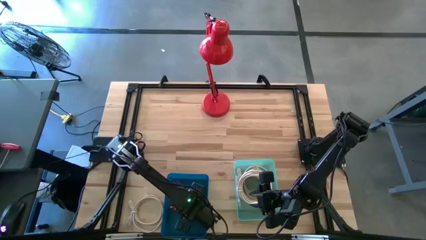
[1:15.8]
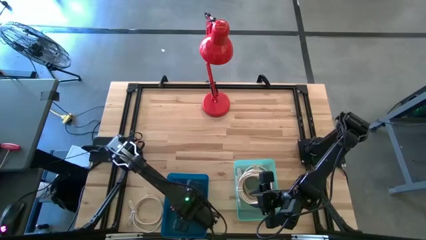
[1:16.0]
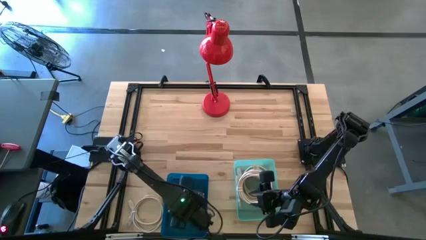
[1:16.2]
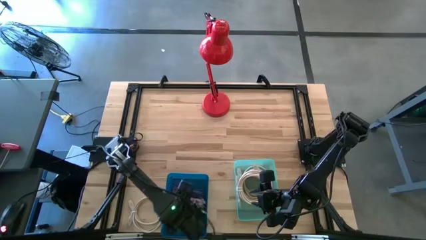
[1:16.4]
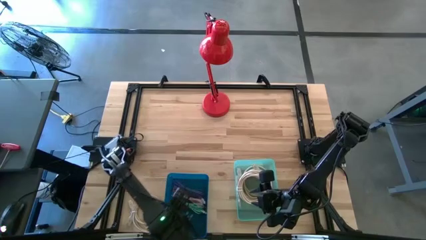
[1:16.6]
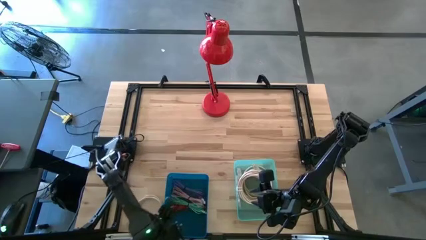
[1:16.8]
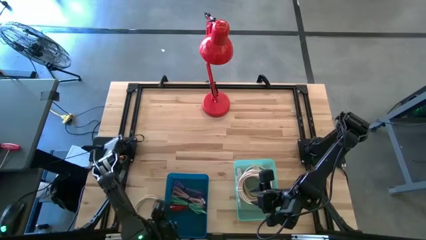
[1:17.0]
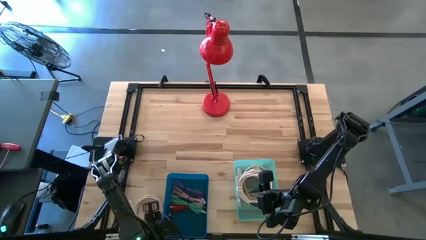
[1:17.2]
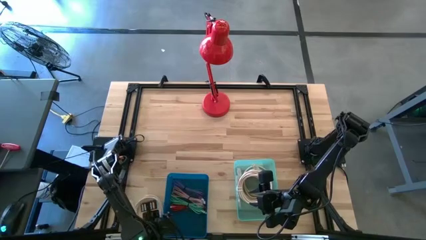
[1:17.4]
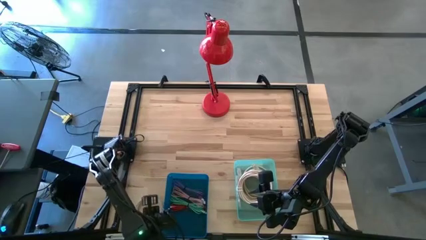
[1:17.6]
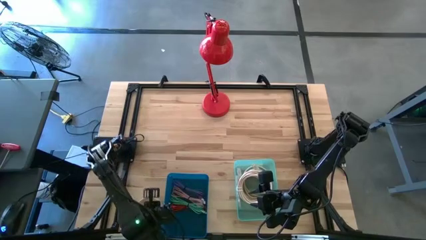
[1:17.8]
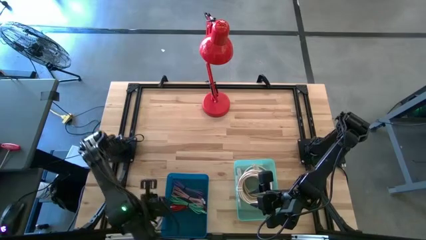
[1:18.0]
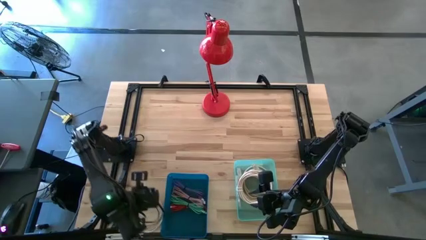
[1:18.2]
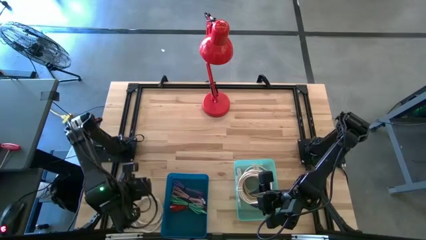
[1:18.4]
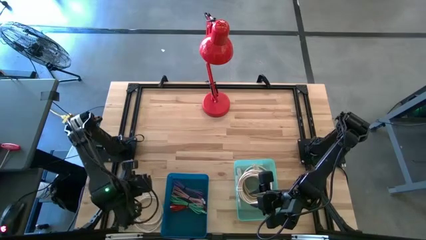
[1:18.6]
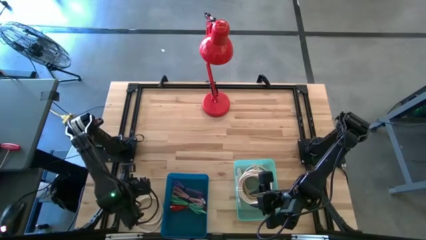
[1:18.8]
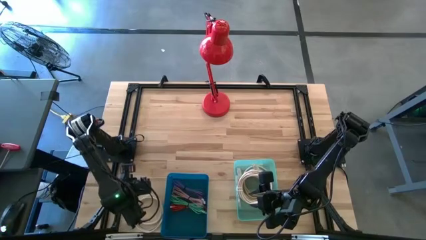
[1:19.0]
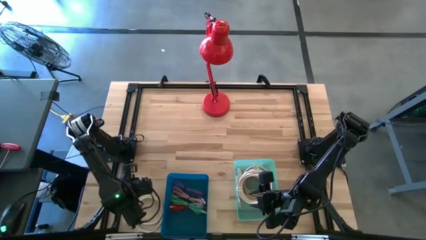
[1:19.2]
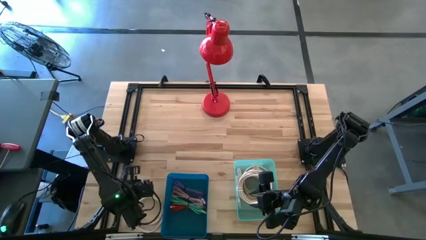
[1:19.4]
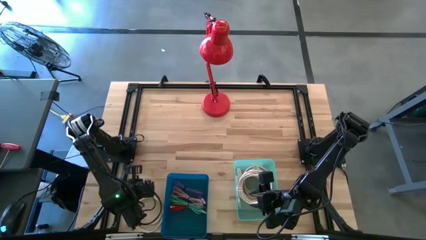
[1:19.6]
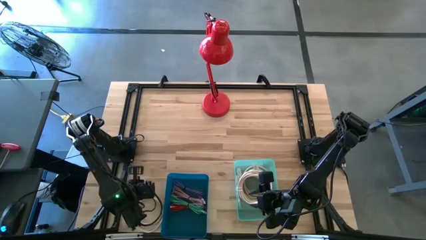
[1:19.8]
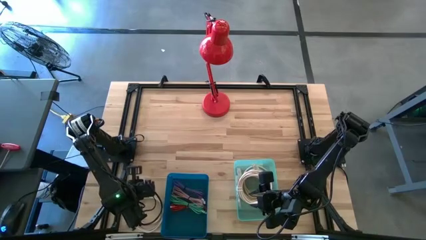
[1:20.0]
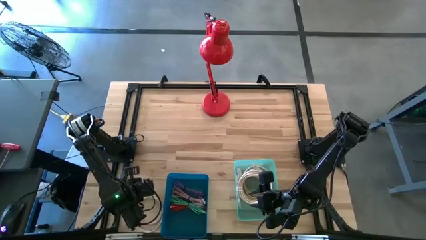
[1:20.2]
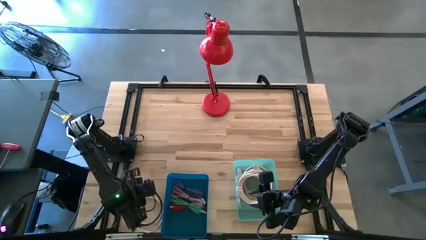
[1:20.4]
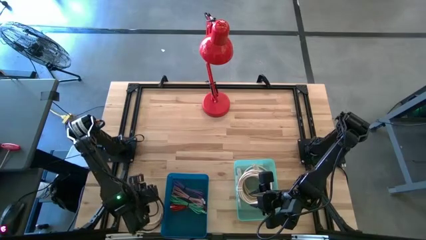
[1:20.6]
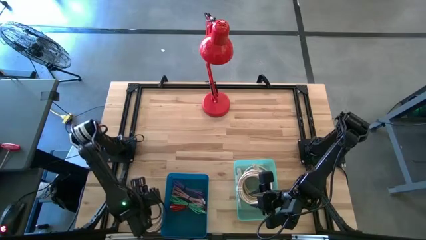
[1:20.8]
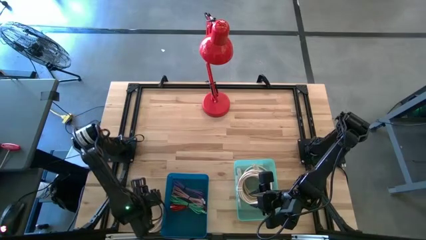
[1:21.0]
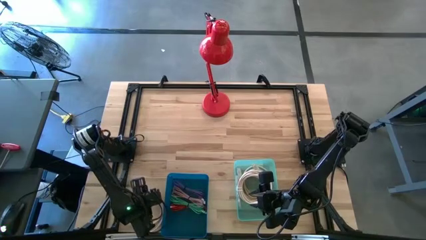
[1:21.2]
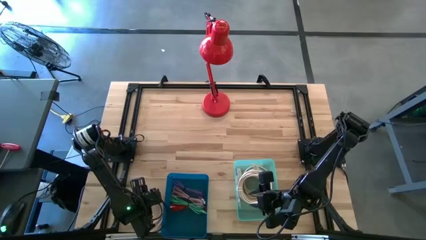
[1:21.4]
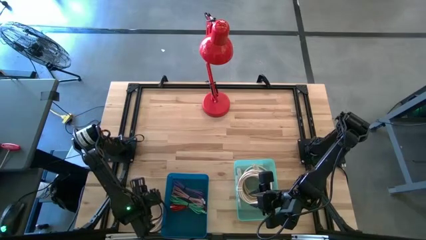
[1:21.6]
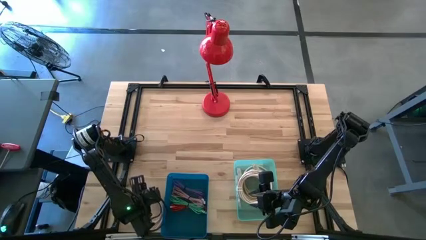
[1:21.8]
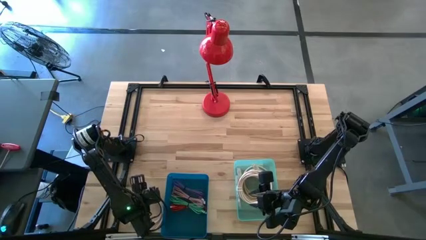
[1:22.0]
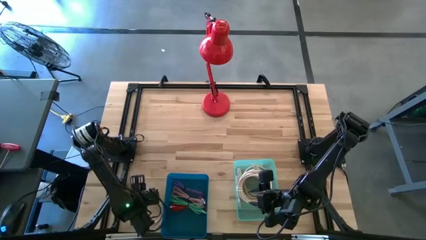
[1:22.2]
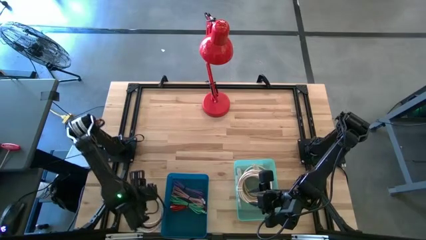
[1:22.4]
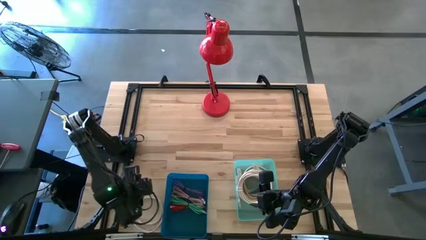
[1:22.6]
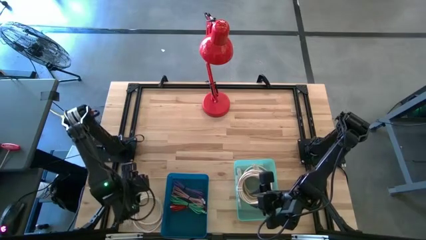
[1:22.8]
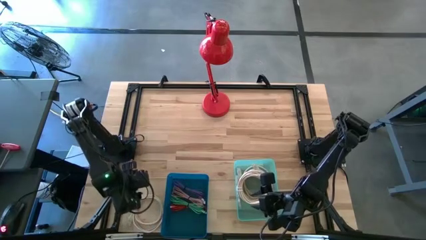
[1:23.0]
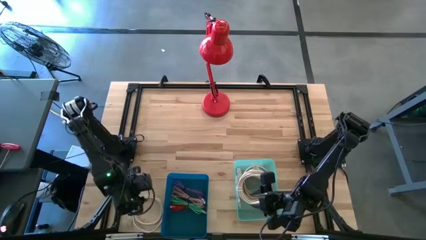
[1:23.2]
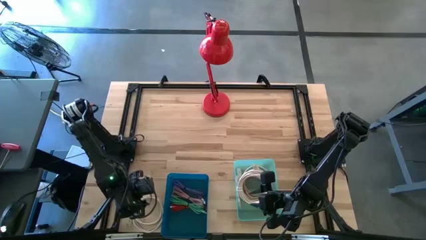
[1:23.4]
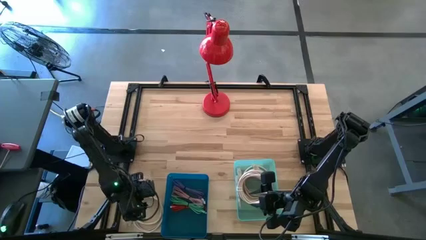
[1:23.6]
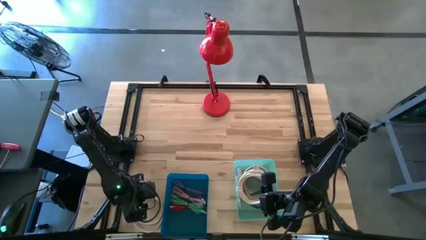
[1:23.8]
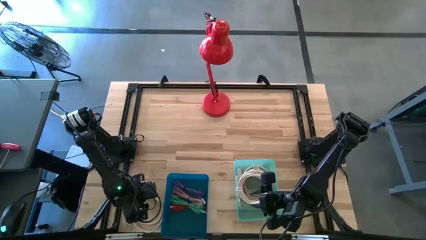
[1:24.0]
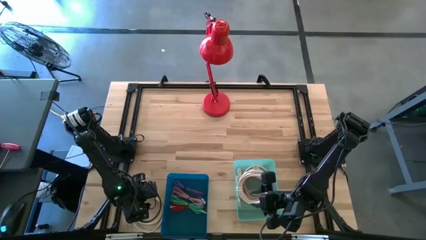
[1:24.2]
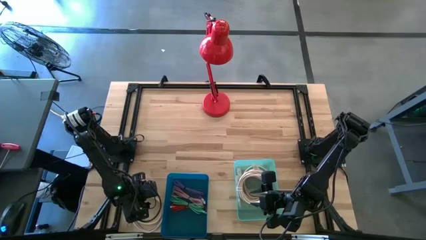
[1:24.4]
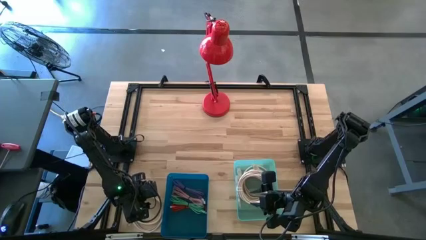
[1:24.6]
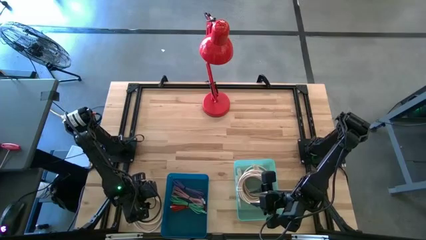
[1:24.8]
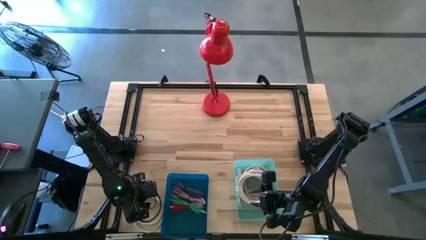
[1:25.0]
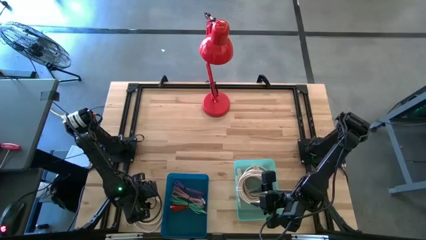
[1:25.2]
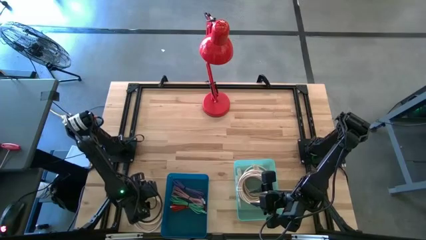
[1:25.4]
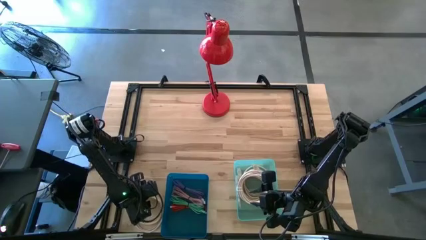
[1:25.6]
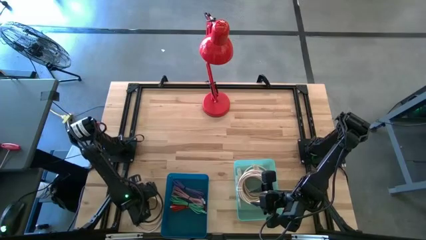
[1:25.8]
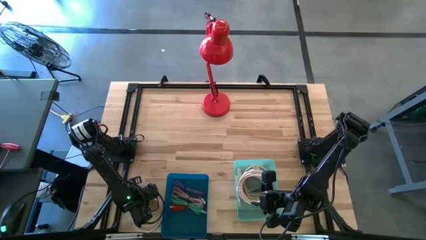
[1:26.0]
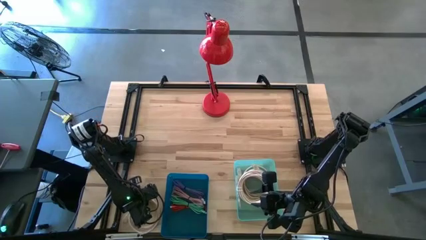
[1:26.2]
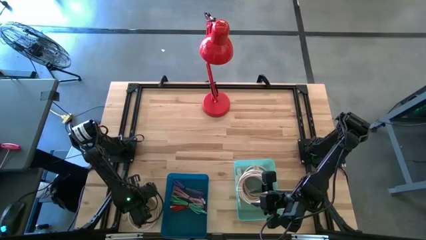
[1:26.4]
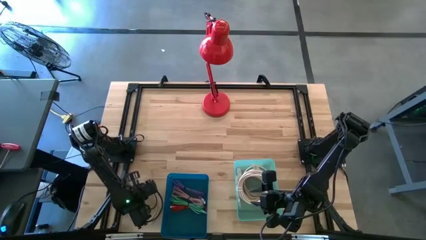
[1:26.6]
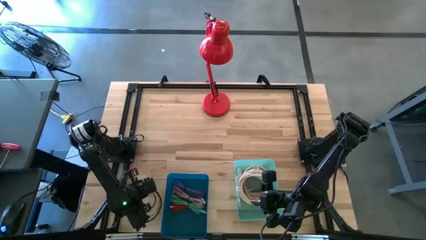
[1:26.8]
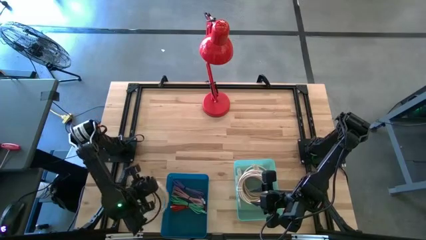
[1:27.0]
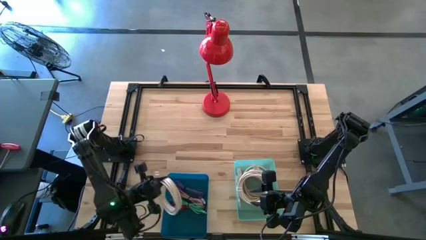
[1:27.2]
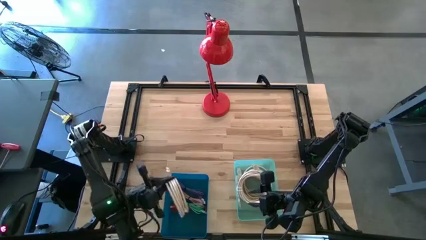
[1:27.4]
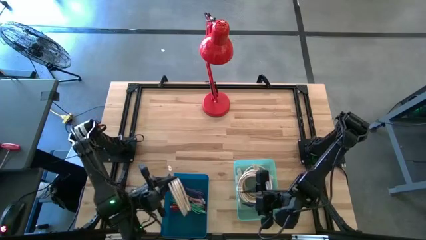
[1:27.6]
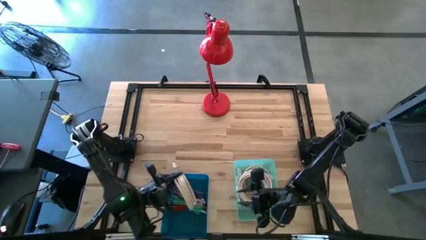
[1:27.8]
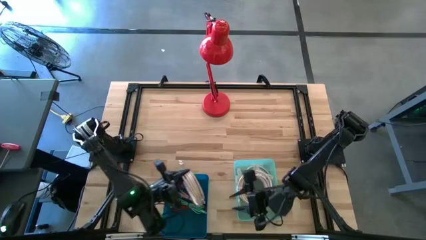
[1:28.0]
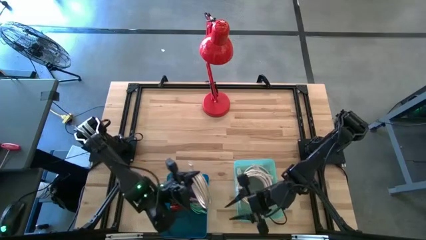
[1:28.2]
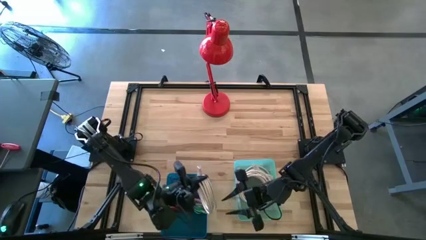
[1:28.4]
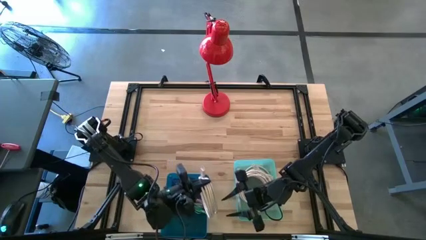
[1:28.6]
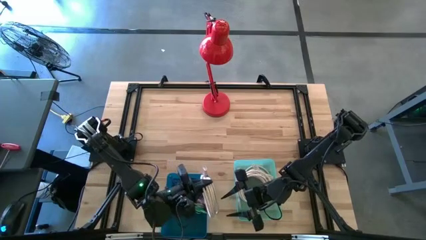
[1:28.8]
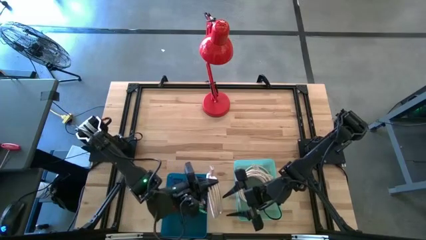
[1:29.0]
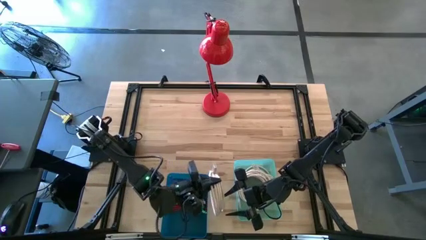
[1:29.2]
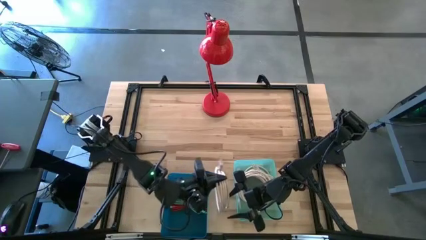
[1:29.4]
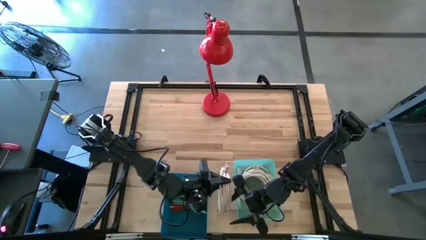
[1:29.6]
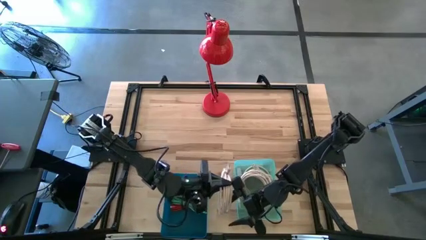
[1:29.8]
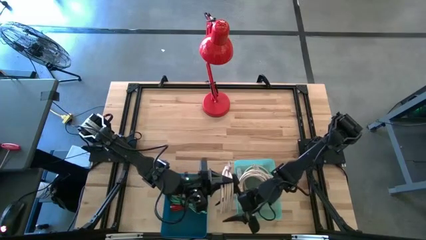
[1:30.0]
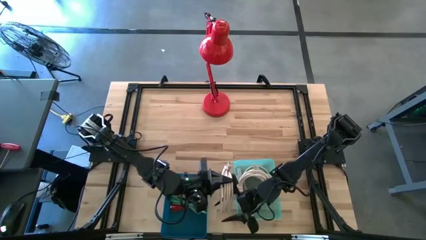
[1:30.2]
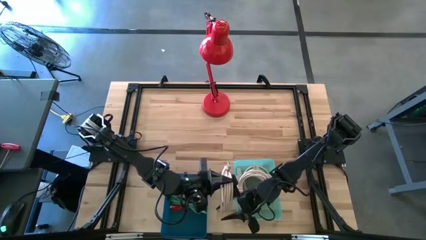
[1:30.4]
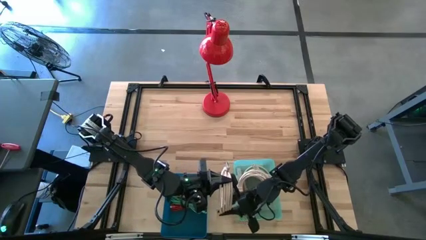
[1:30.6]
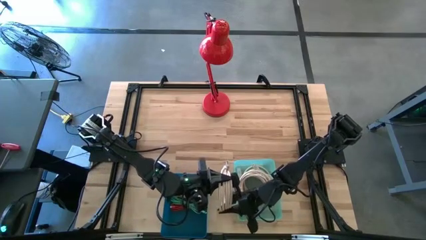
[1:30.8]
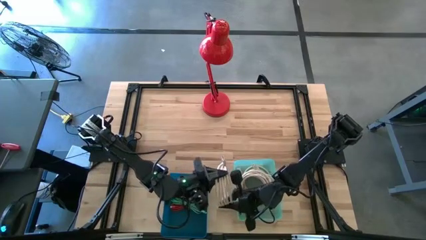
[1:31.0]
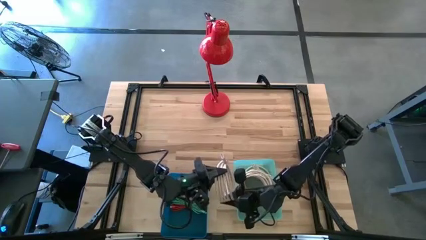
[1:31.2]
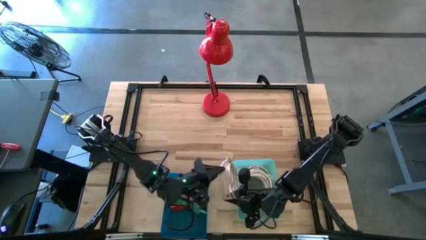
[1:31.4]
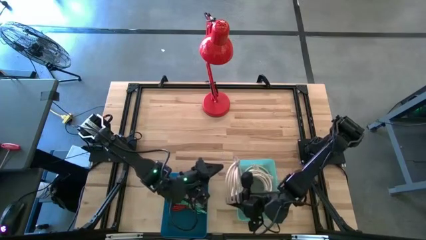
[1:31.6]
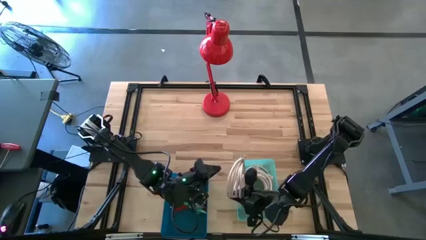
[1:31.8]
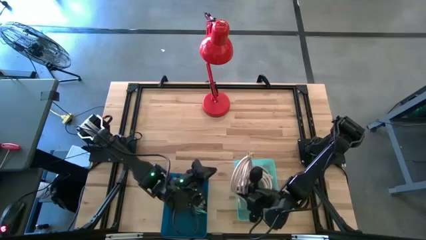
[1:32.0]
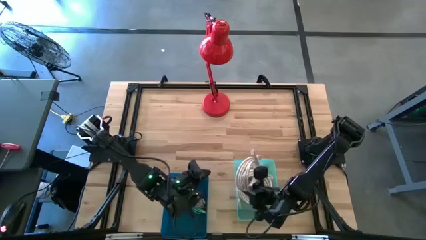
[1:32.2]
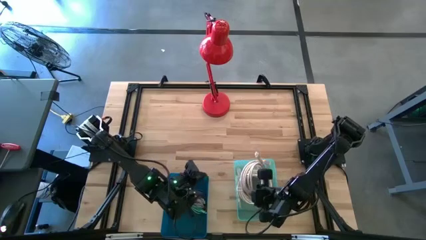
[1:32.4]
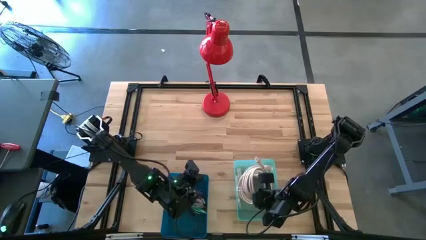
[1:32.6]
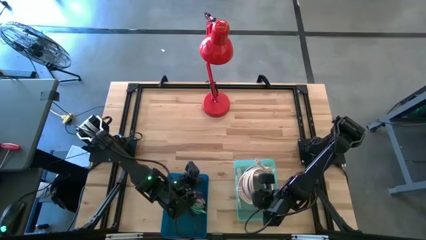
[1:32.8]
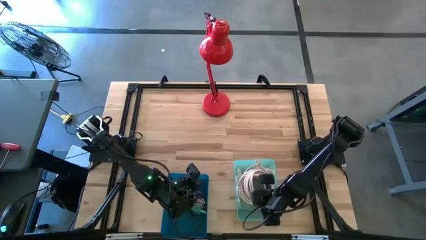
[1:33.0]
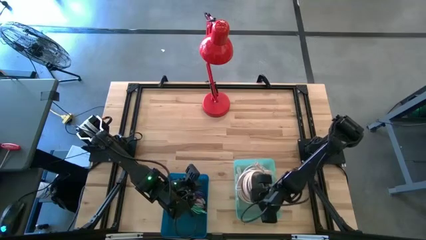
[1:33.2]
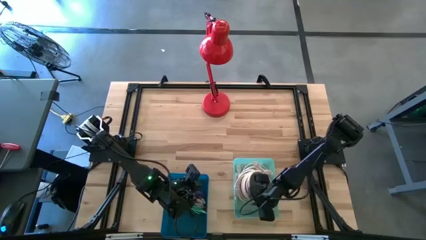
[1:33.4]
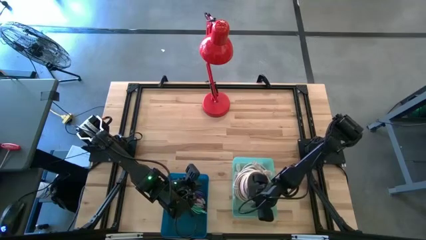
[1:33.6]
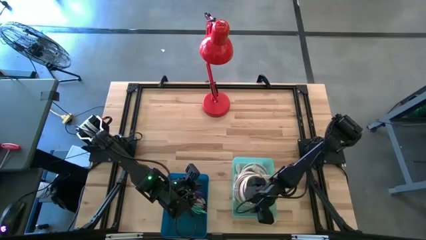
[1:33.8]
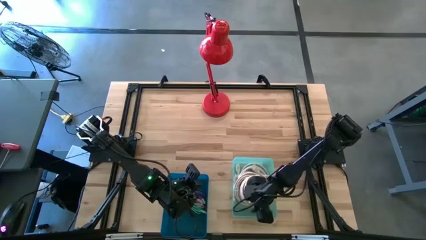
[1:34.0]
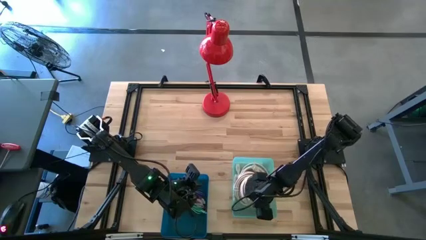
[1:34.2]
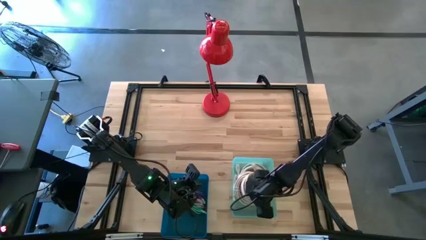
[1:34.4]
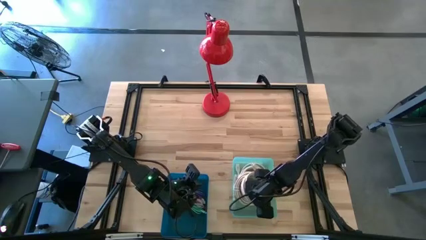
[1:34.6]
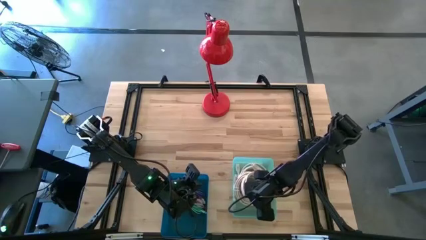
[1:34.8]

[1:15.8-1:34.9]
Task: Pick & Place USB Port
Put the white USB cable into the green bin
